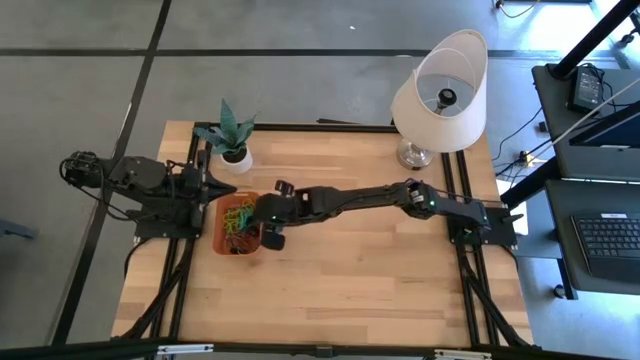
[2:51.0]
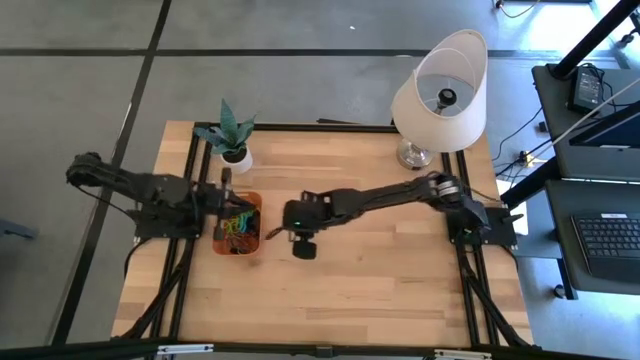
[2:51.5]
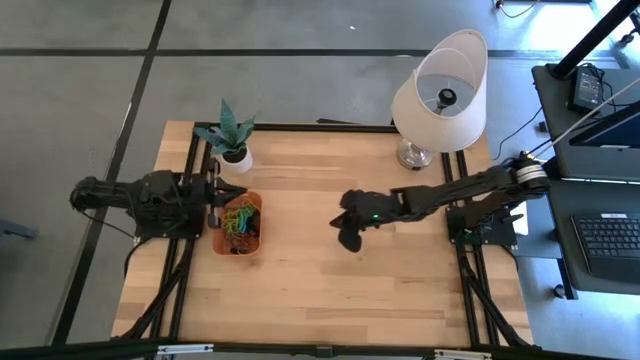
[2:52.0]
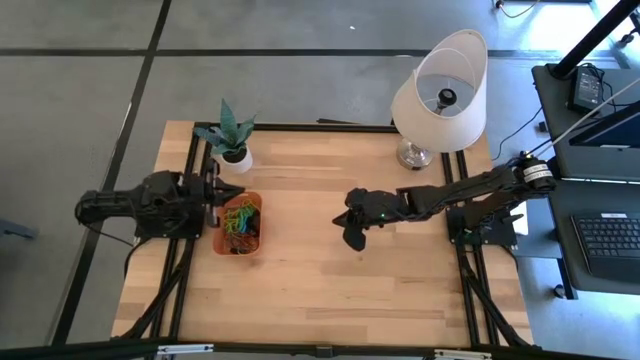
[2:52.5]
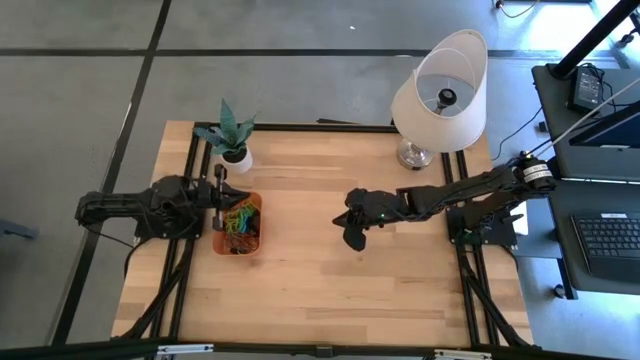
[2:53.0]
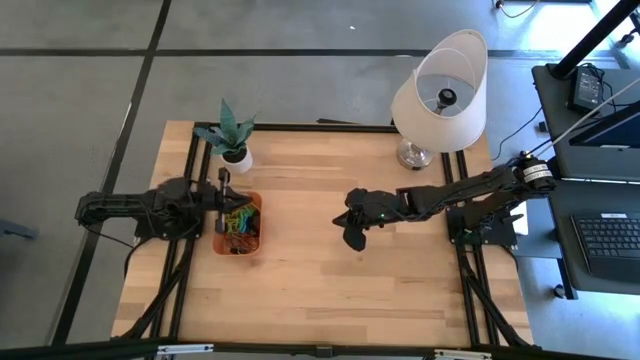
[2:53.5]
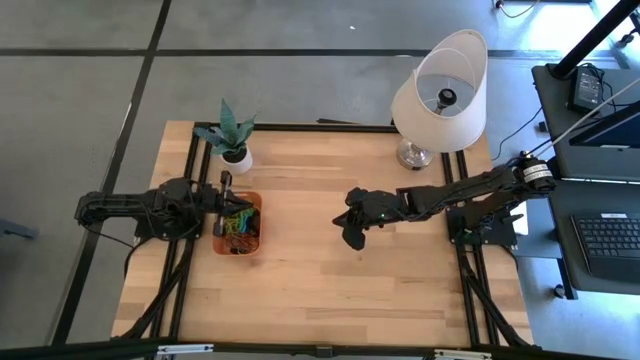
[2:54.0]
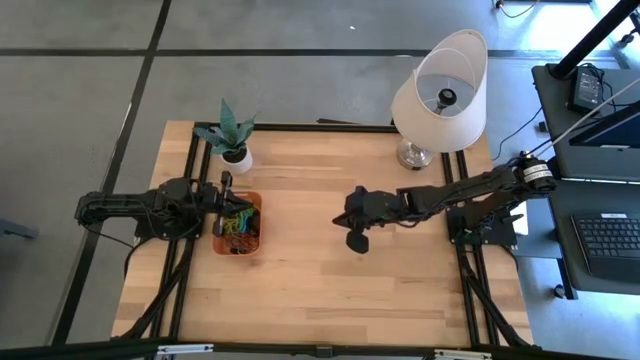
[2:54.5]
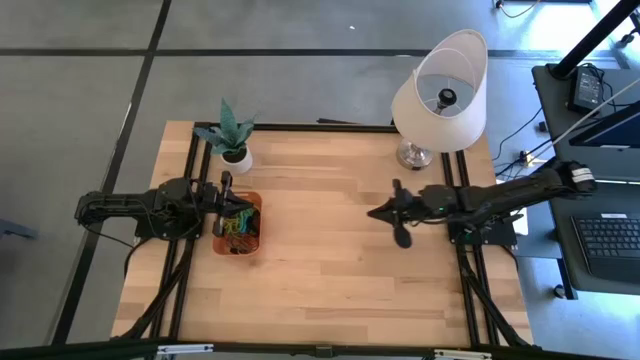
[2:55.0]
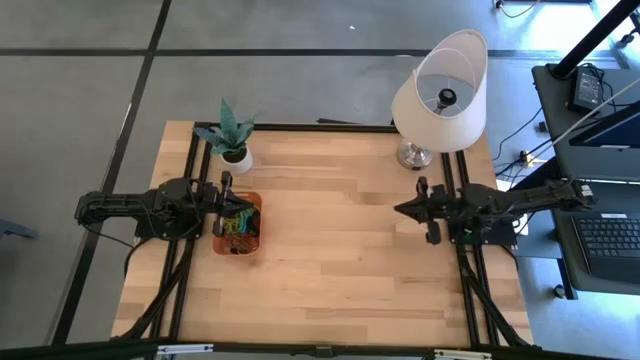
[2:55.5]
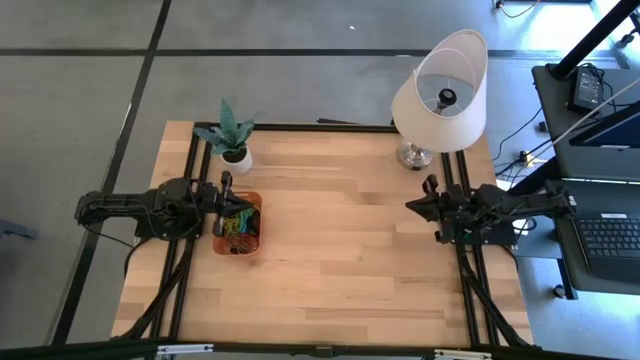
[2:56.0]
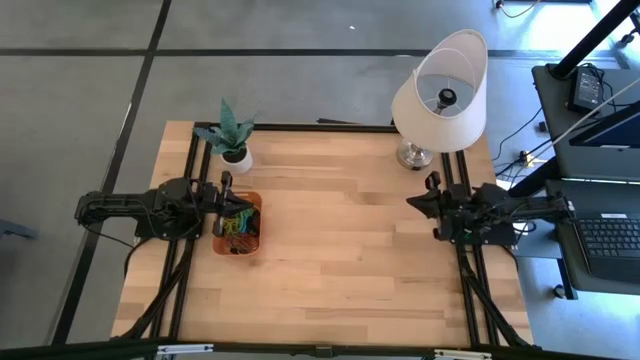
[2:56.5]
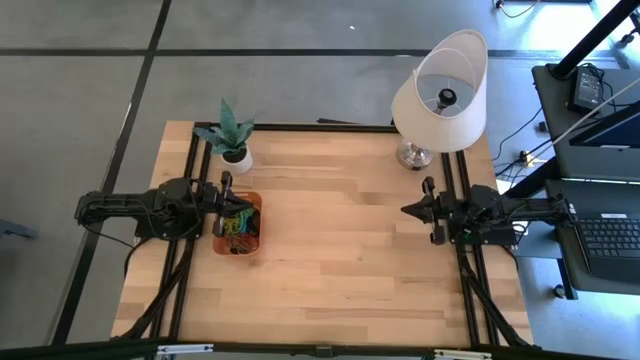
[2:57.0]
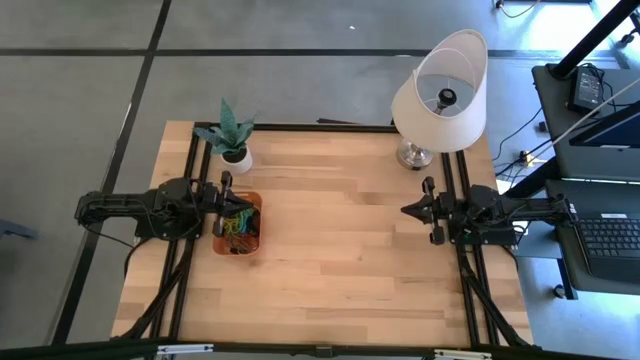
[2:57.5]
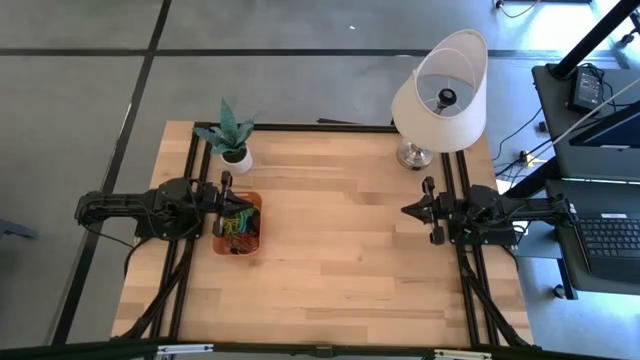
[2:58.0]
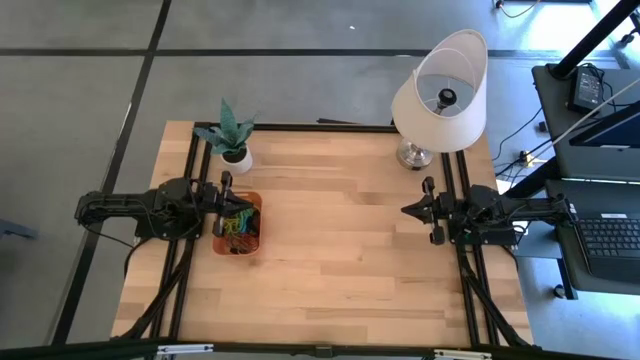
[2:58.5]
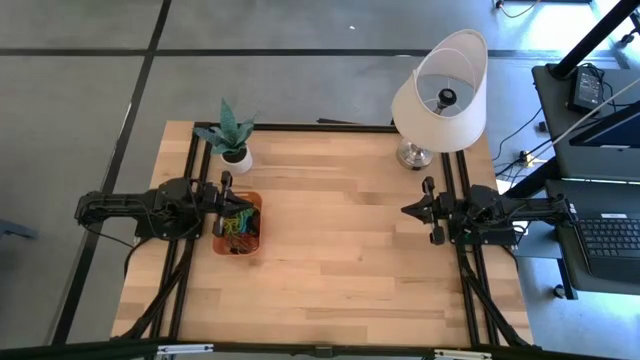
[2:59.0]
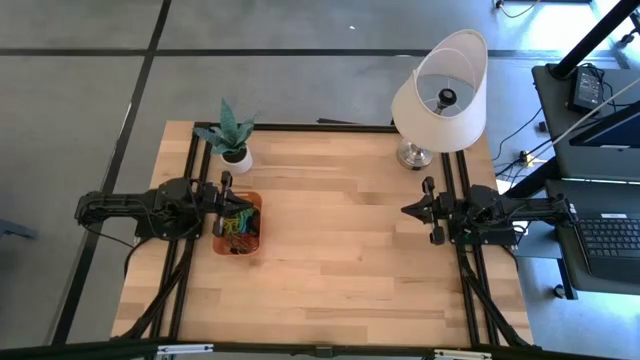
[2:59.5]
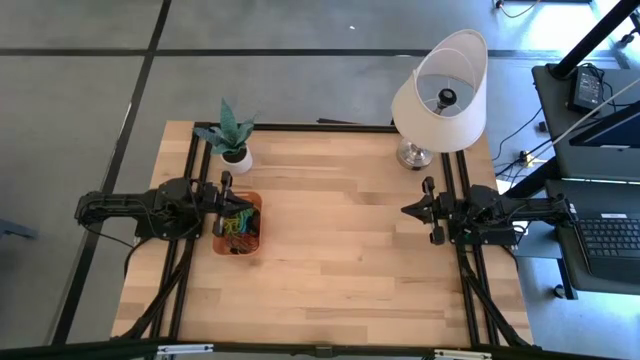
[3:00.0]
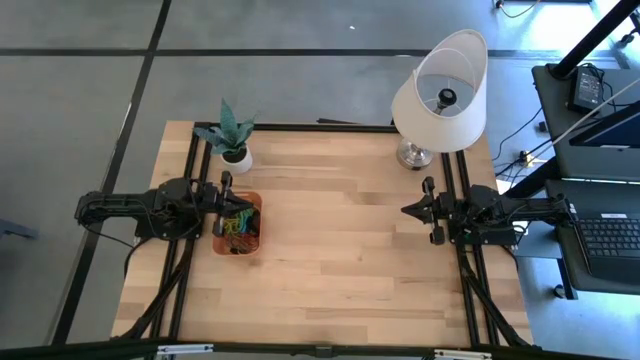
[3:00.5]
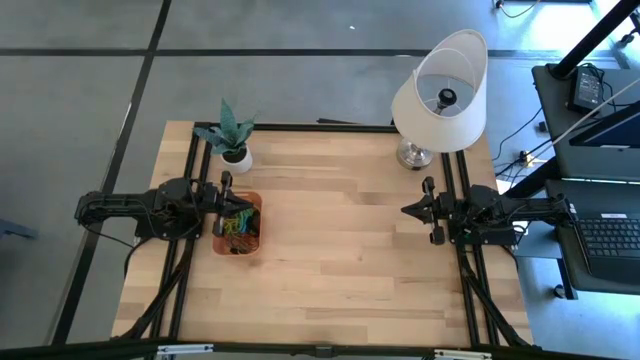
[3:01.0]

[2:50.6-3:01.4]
Task: Pick and place rubber bands into bin
Return to Home Position

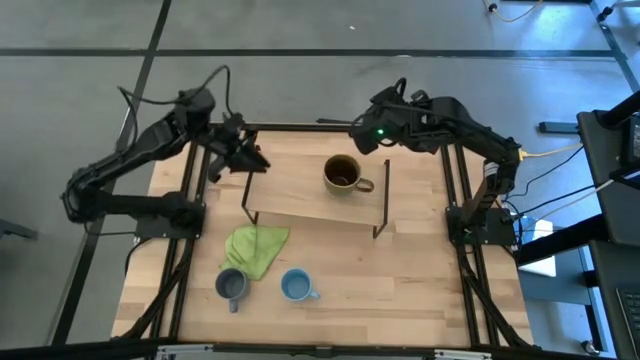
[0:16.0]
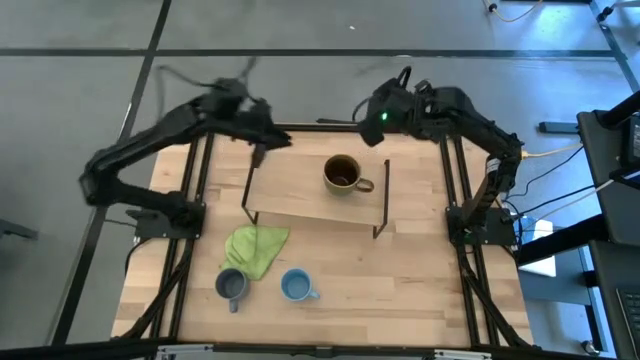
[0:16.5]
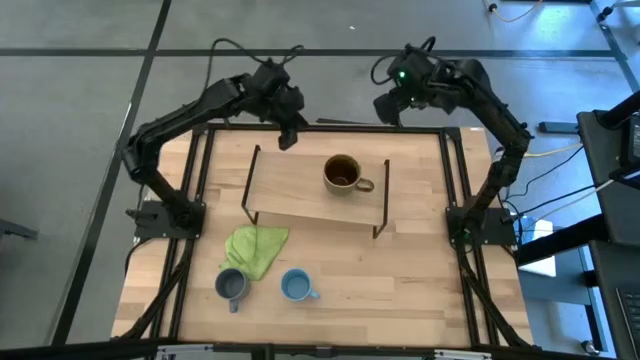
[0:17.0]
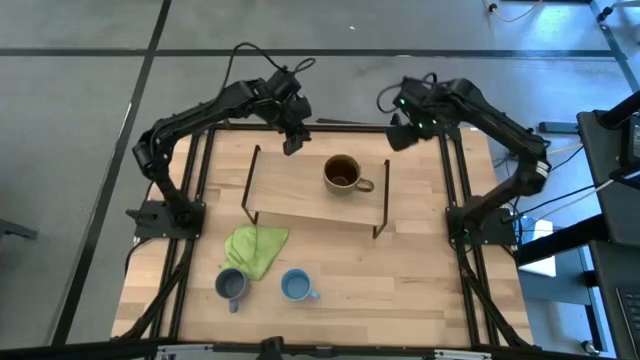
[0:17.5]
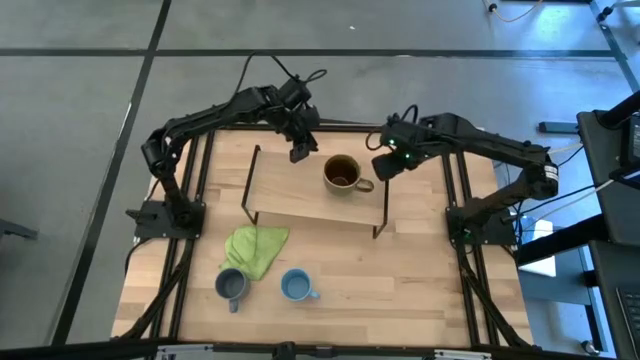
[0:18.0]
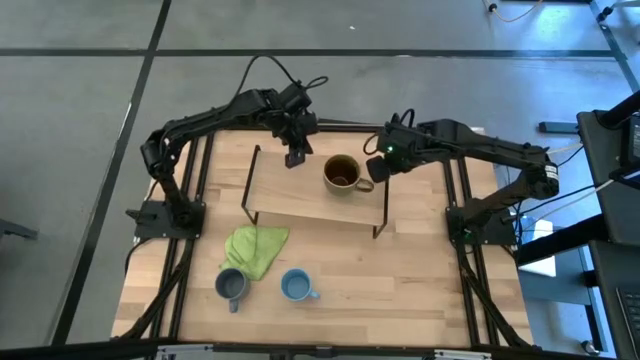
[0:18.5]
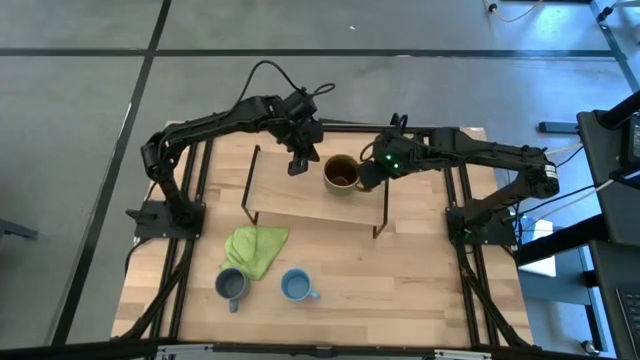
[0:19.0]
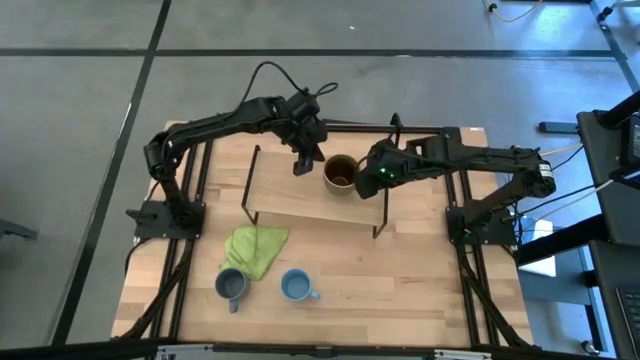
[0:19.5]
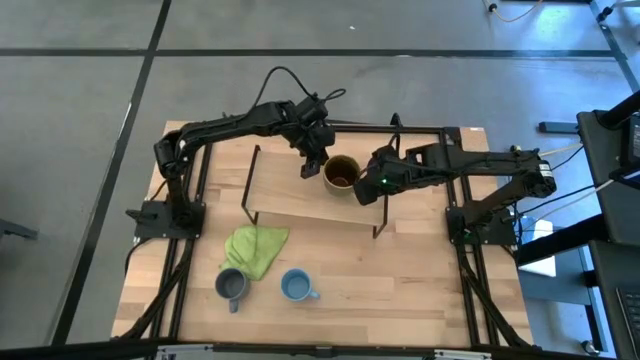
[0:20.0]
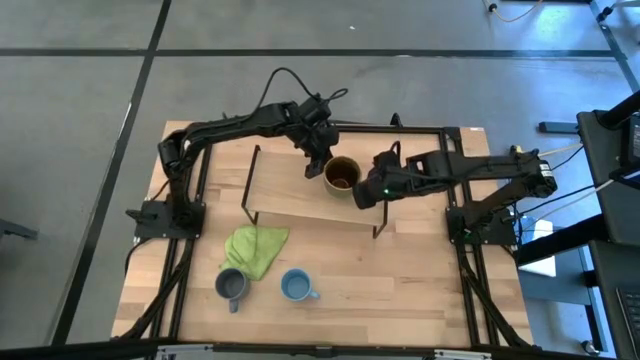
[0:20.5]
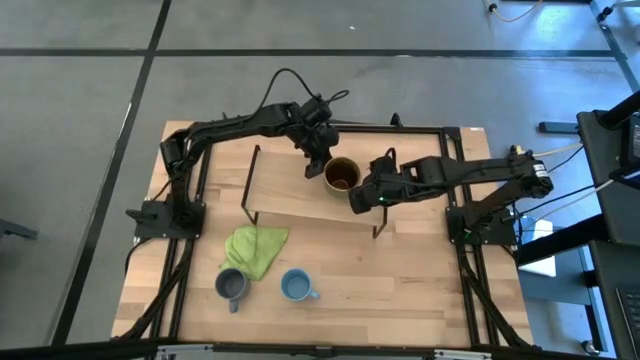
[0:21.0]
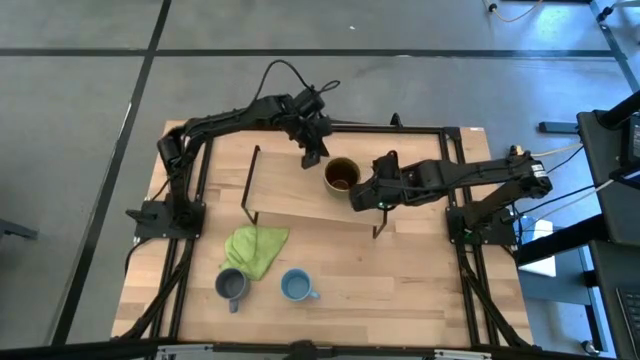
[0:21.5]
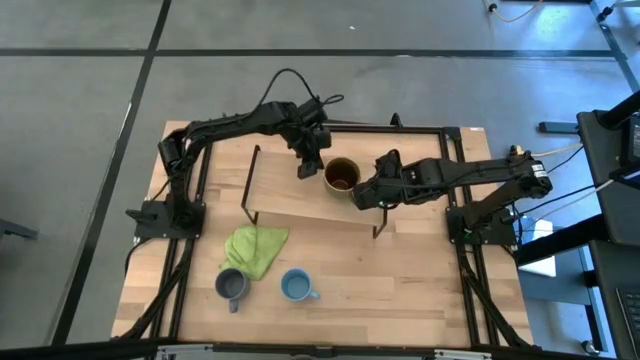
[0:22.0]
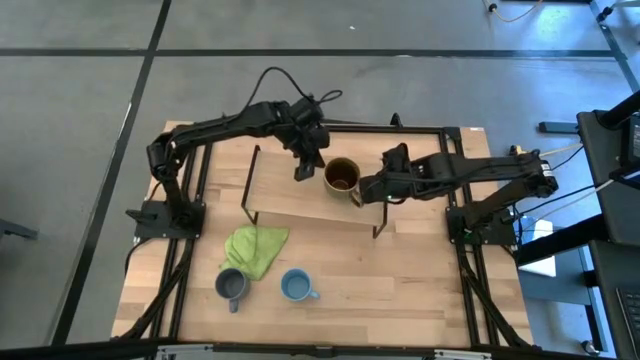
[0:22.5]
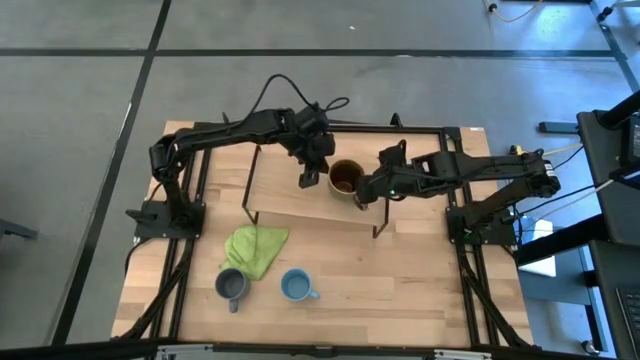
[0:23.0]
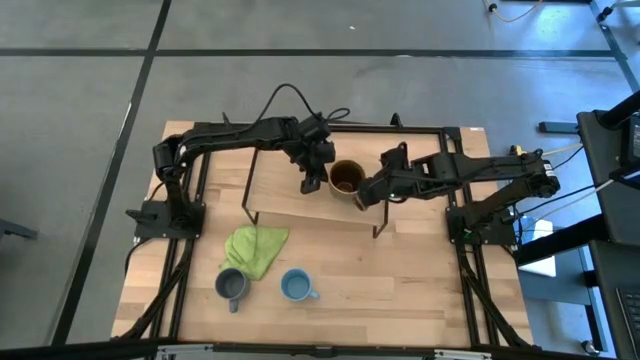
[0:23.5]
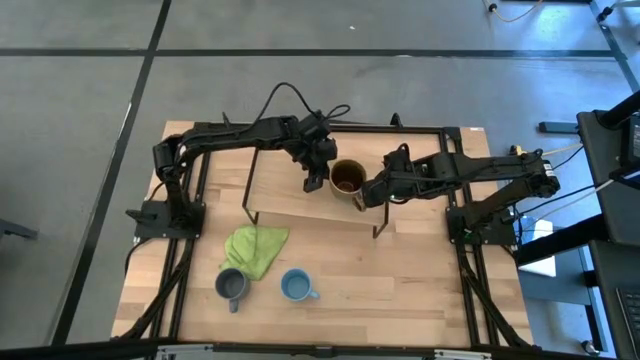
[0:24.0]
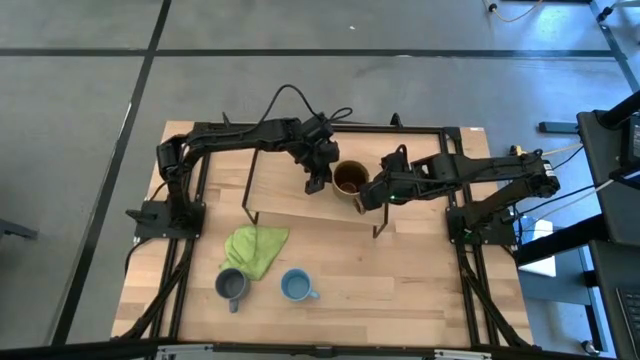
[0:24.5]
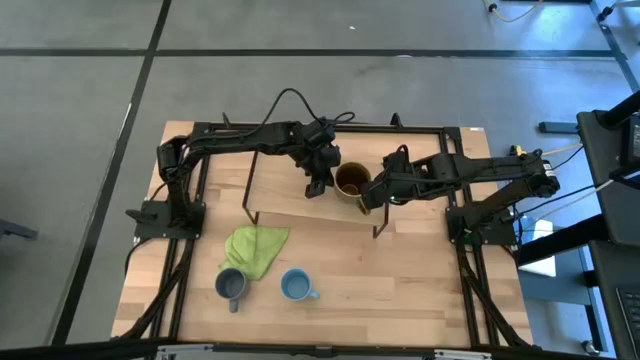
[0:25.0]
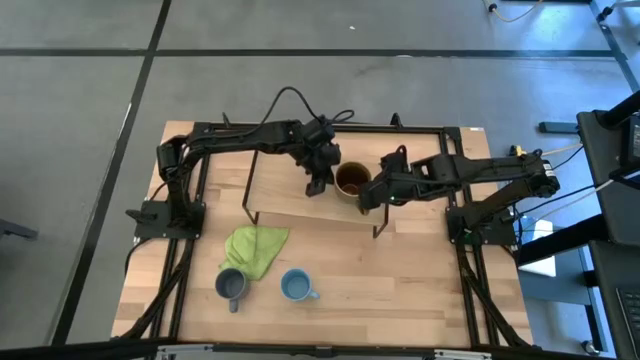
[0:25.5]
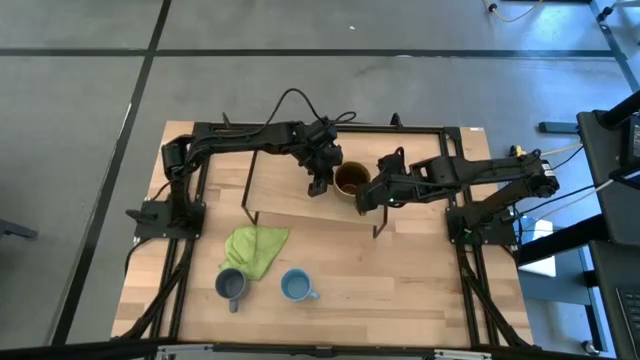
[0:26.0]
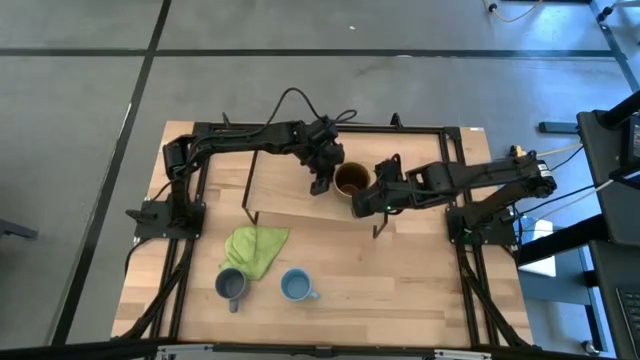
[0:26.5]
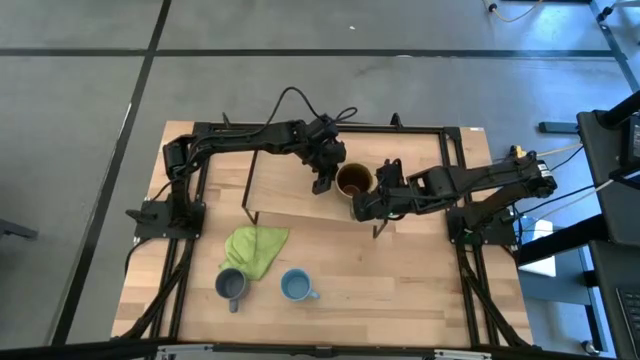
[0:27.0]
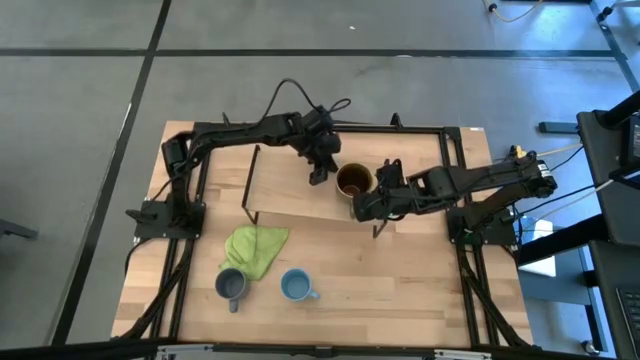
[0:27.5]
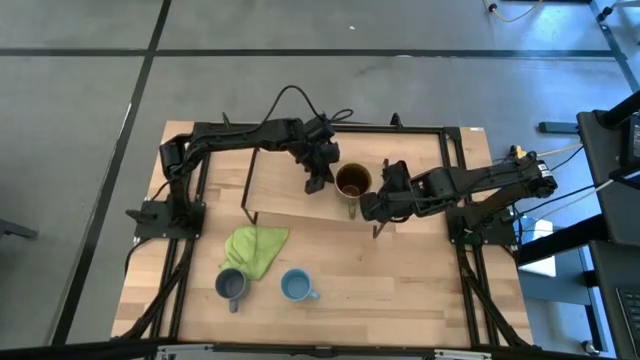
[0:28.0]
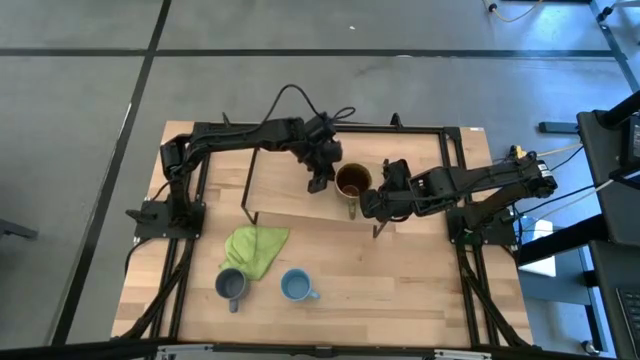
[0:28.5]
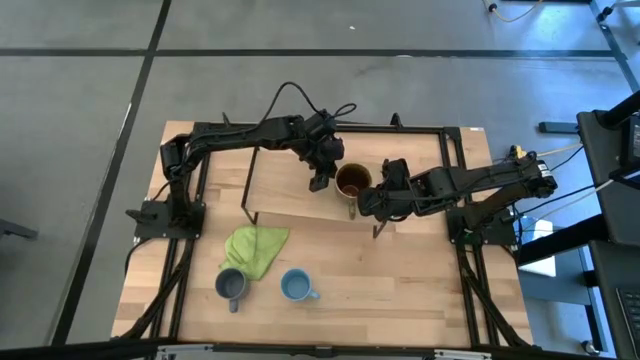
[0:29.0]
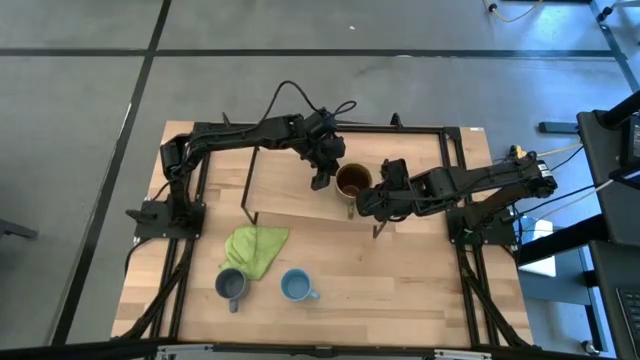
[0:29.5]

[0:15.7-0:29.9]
Task: Stack small to large cups/mugs on shelf
Put the brown mug on the shelf
